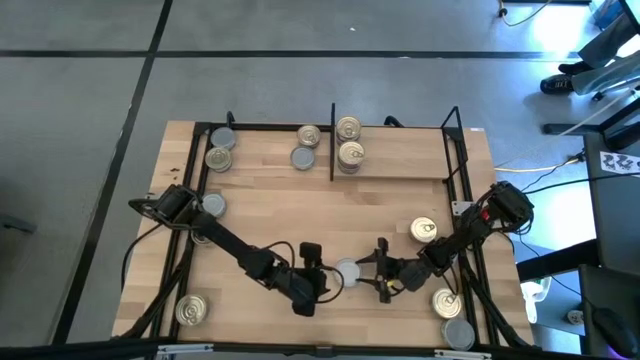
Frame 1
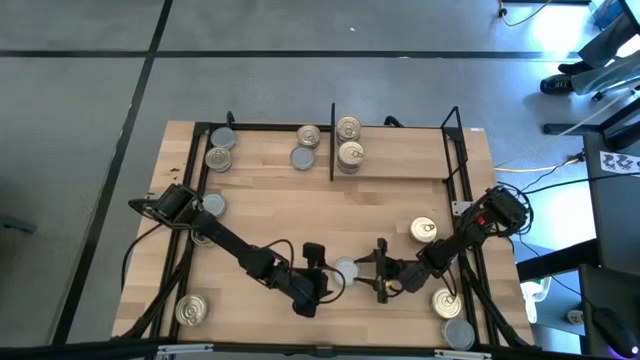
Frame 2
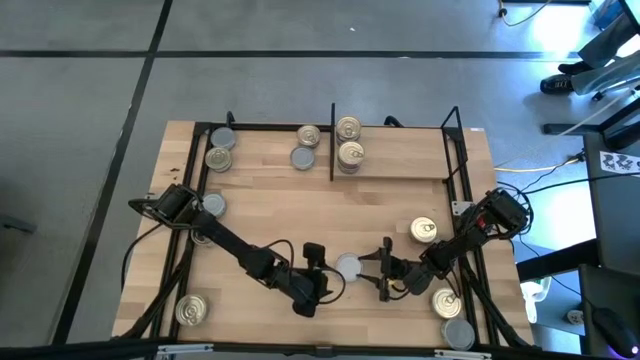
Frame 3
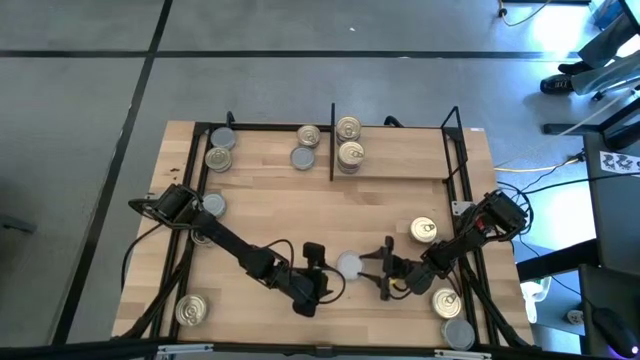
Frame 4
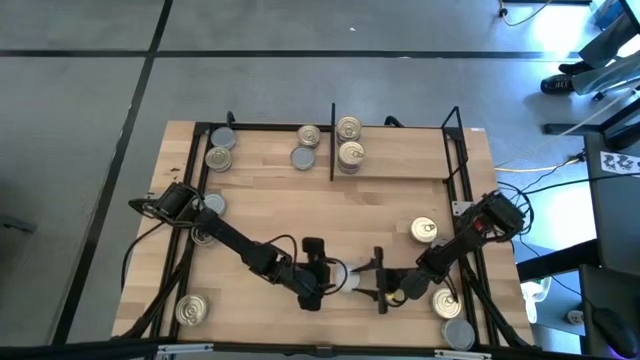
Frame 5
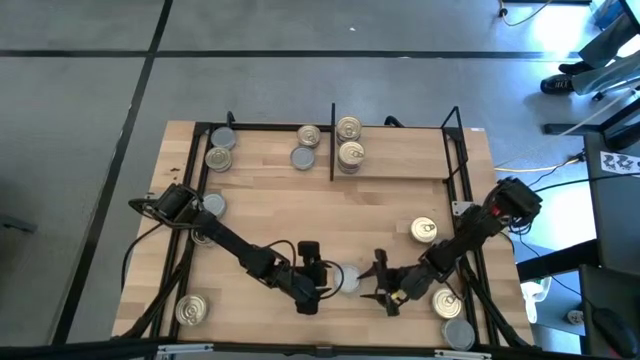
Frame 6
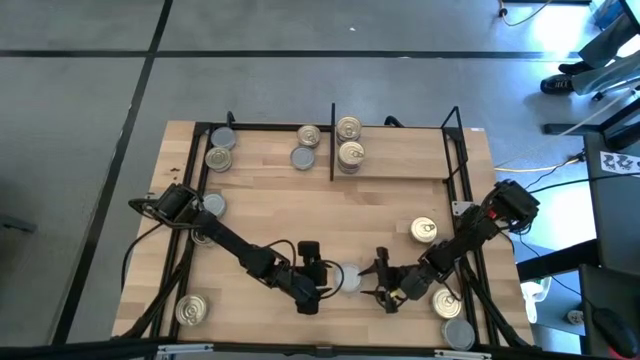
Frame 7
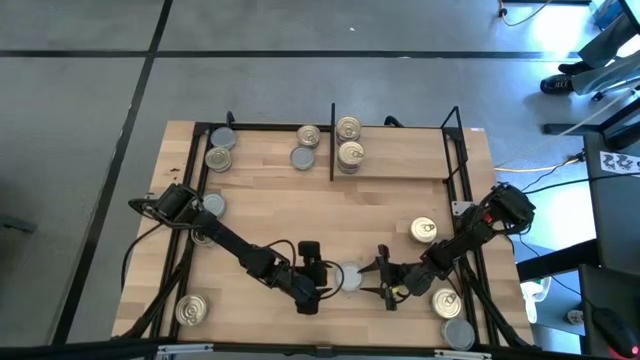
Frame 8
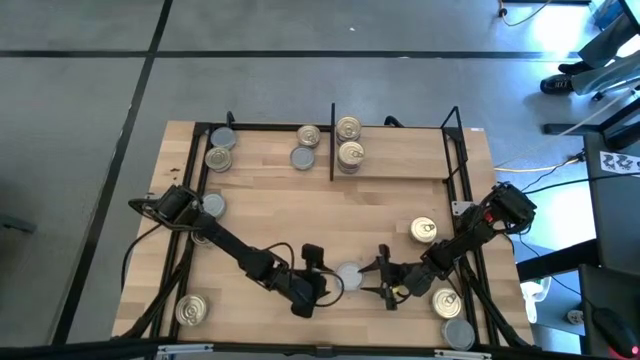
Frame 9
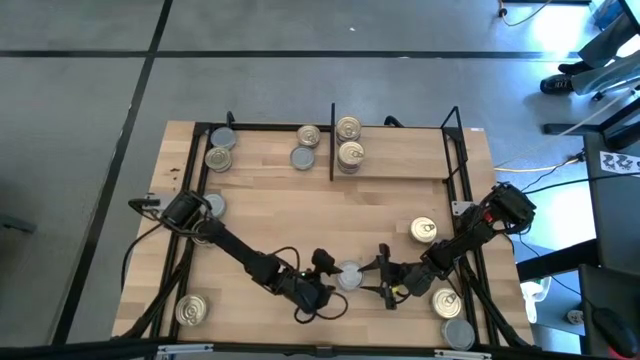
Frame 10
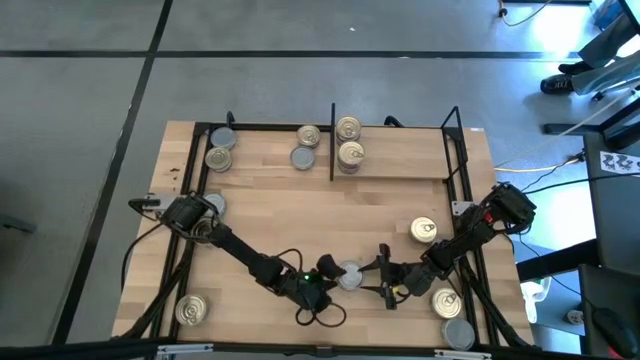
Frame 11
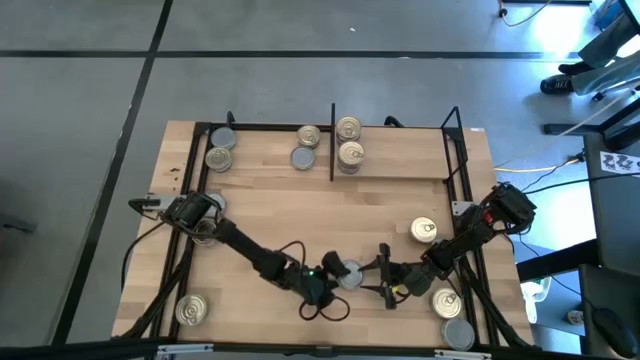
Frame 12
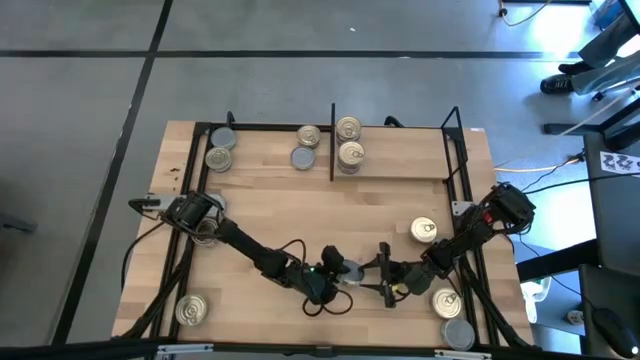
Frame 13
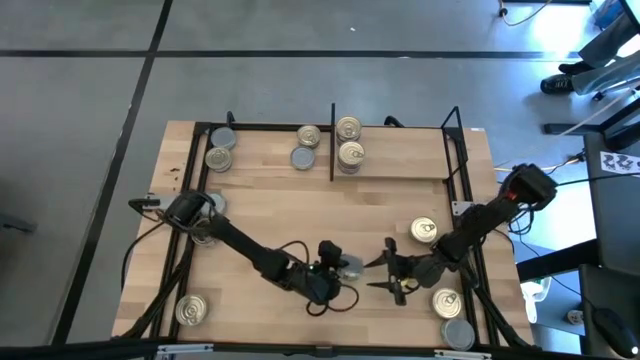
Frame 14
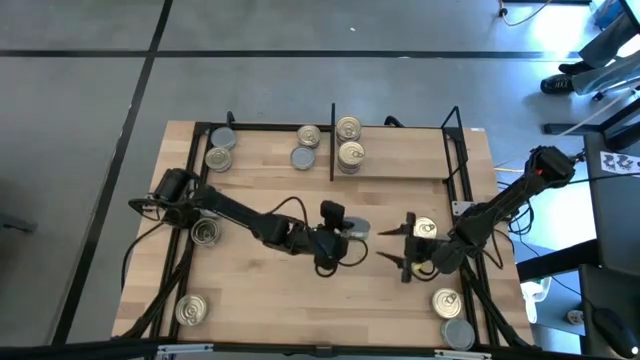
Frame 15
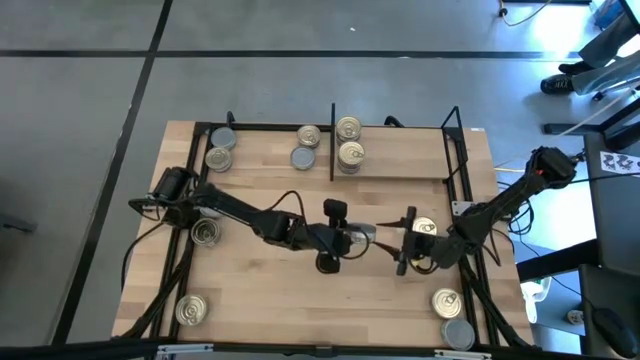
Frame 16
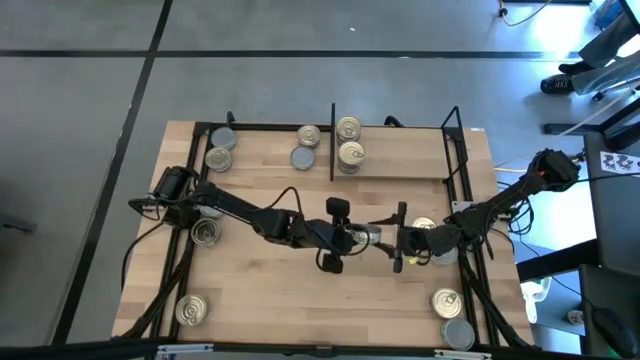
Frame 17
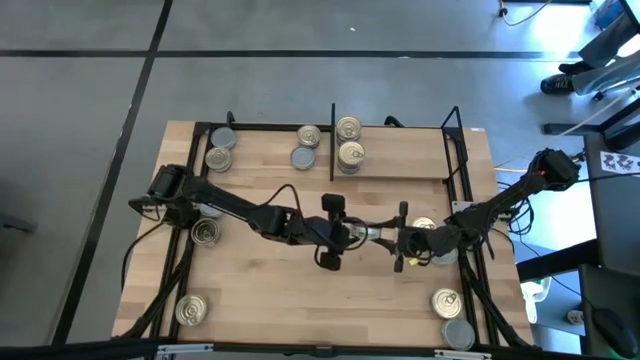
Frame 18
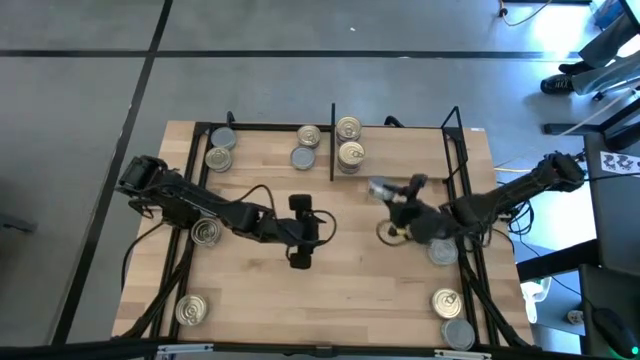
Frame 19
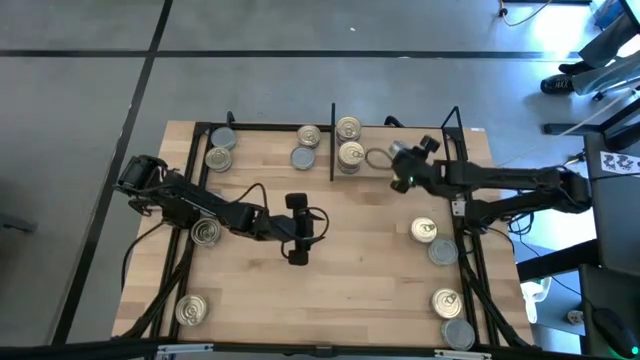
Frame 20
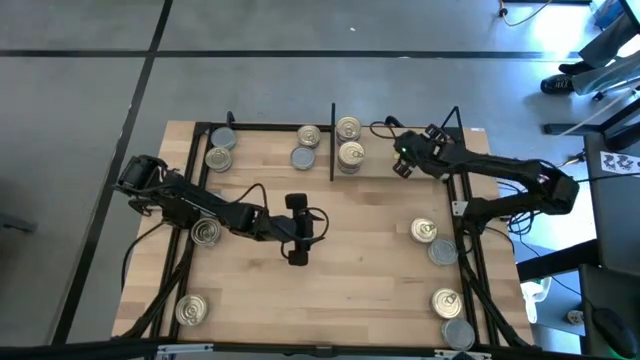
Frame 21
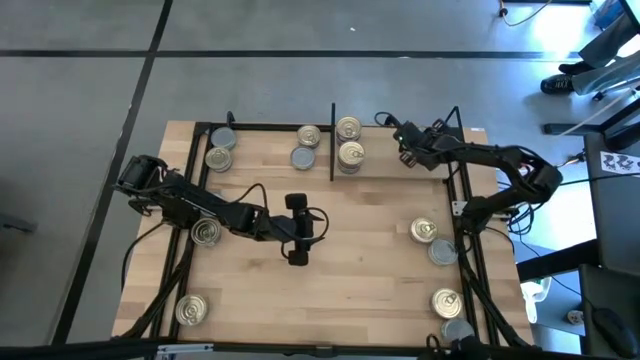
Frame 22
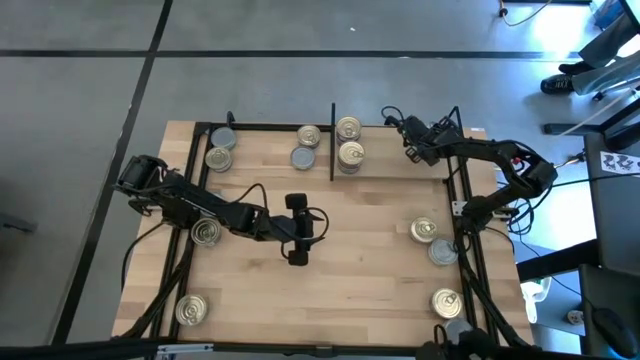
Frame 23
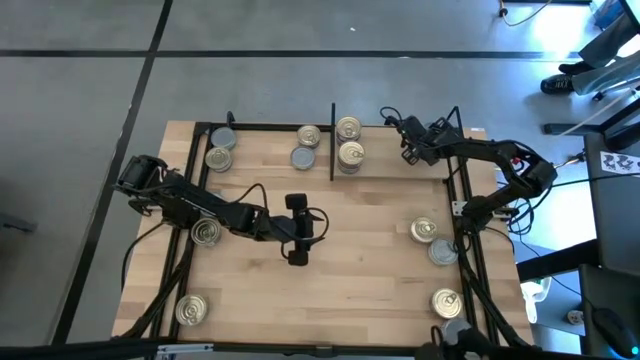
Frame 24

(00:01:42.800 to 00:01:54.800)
Task: Stack canned seafood by type on shelf
Put the green tuna can on the shelf

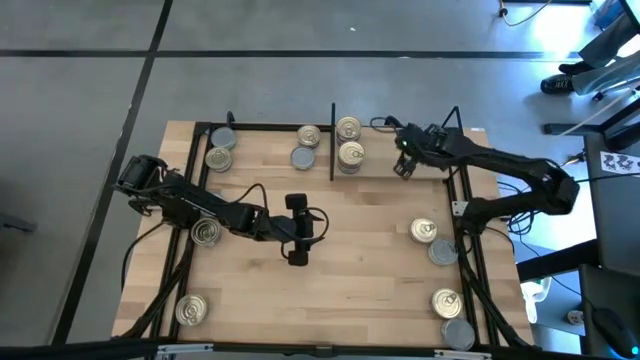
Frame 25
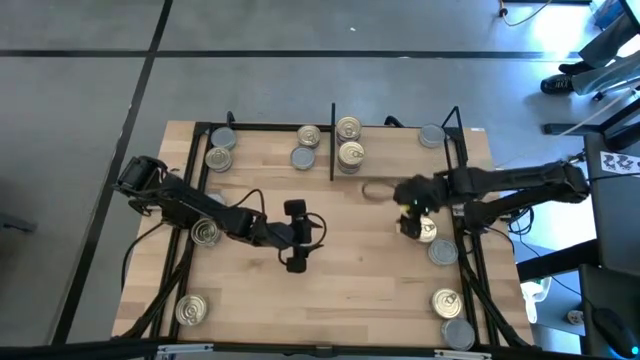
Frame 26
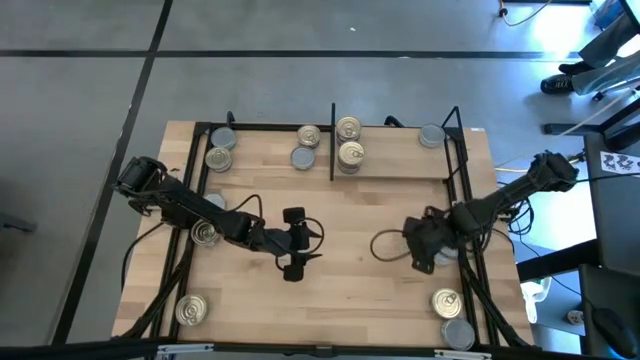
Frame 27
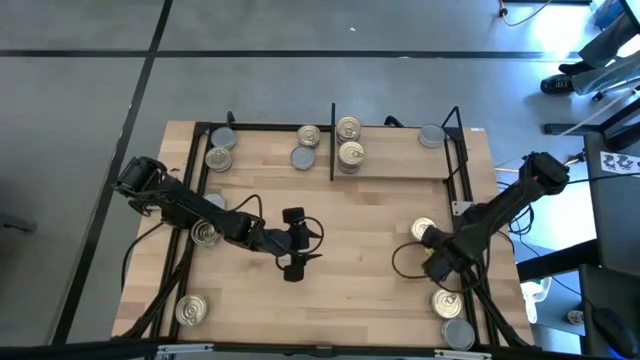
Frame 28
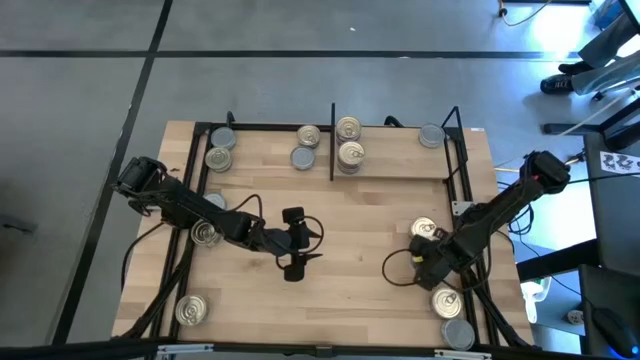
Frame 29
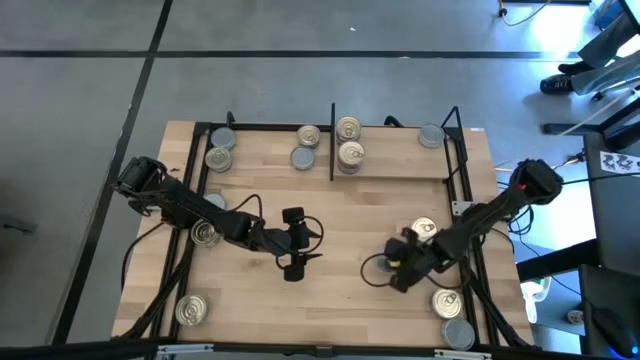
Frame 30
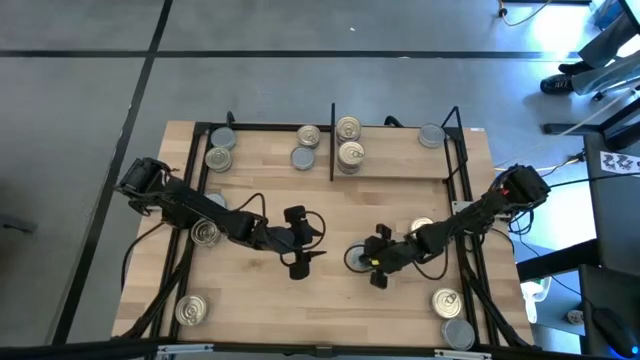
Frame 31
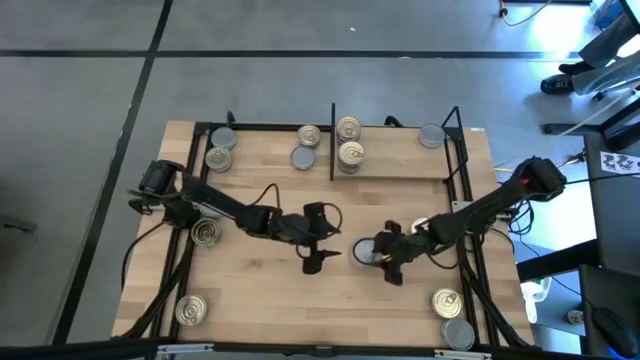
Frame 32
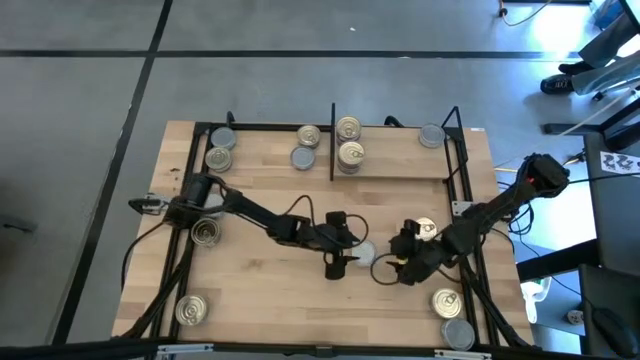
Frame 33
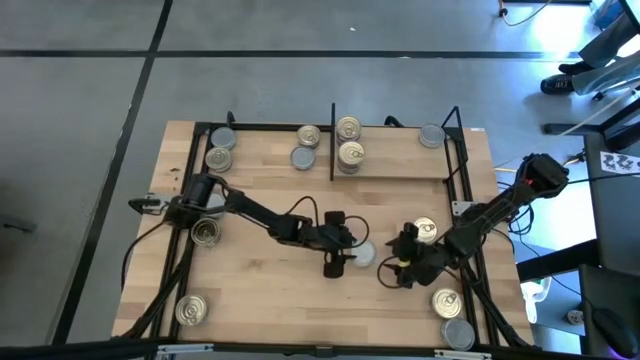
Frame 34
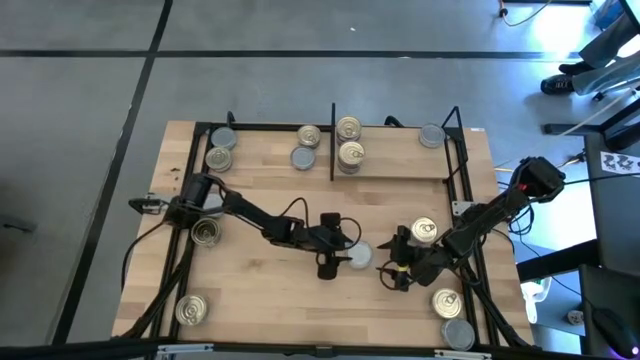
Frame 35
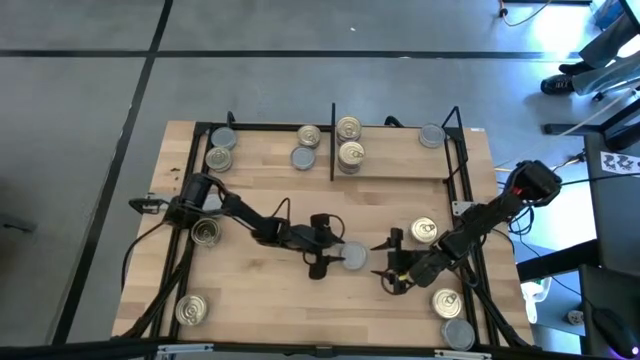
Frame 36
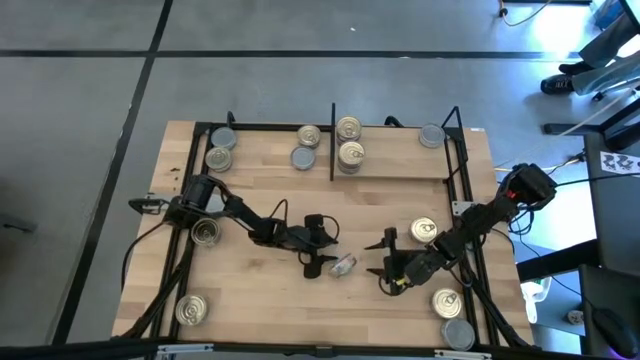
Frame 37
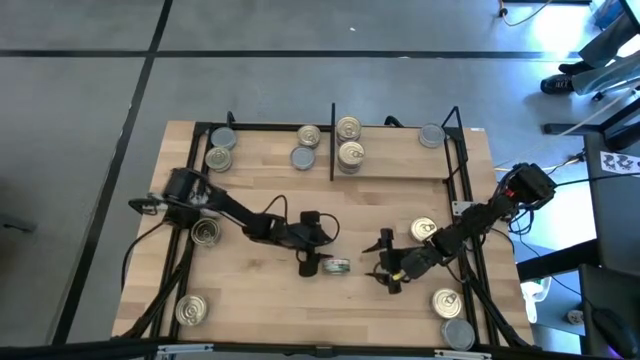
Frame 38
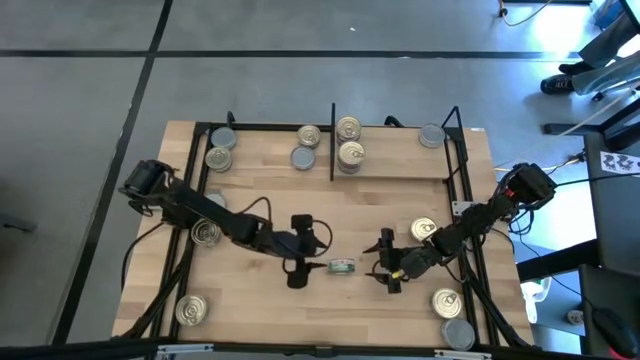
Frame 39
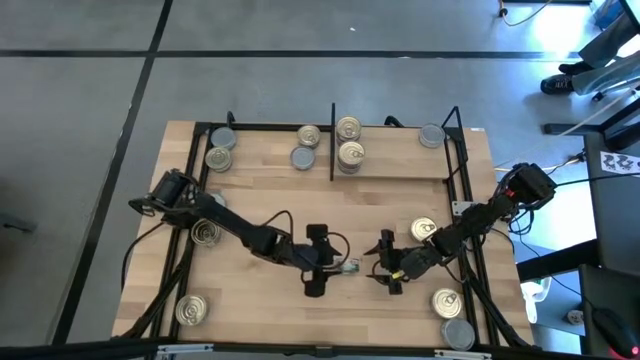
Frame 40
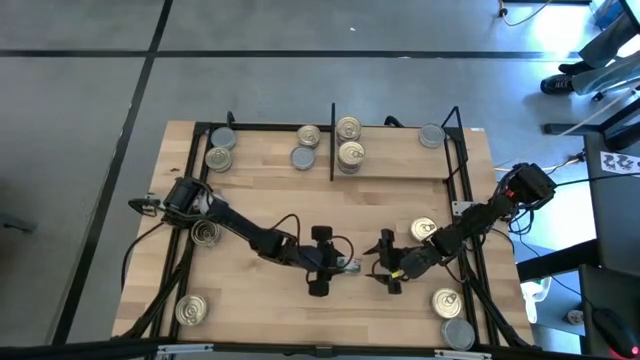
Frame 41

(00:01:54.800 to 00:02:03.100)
Stack the green tuna can on top of the green tuna can

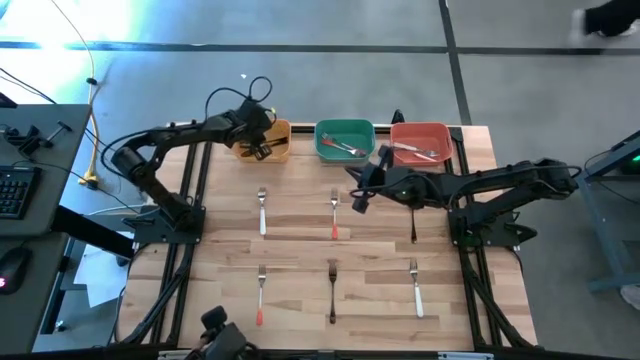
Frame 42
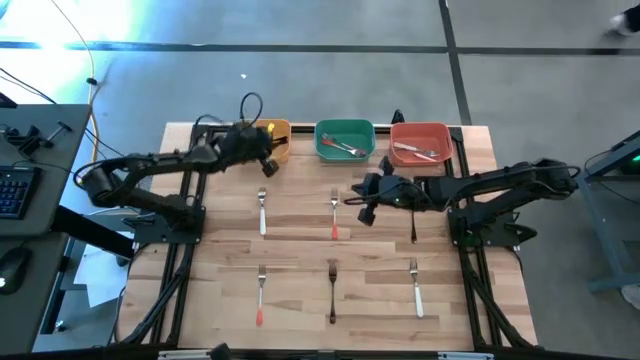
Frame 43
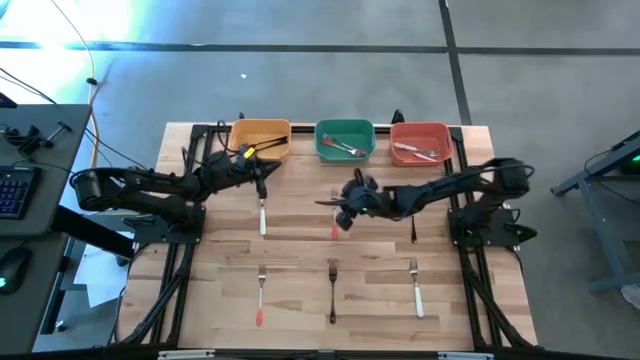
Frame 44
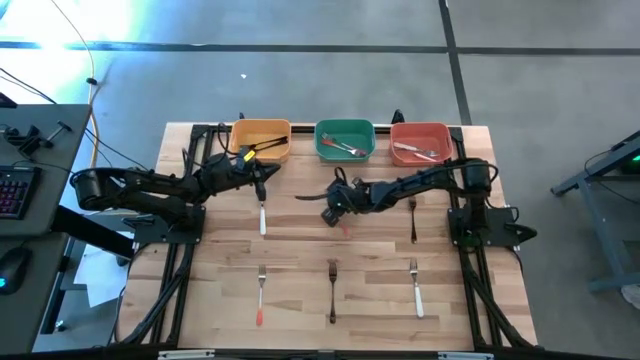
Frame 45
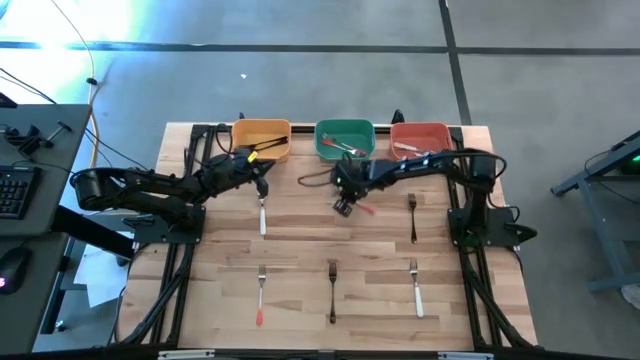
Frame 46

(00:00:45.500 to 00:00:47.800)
Task: Sort silverware by color (type)
Put the top orange fork into the blue bin
